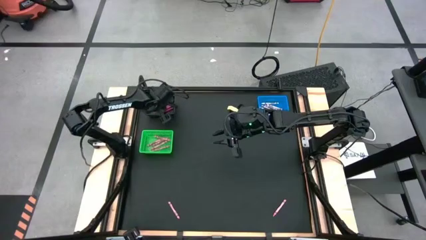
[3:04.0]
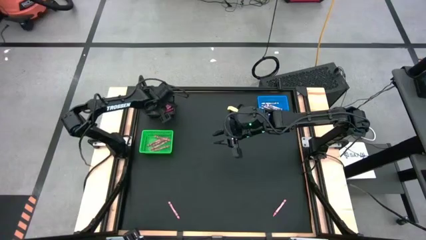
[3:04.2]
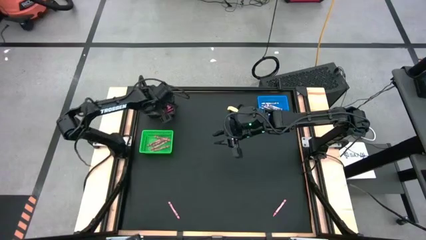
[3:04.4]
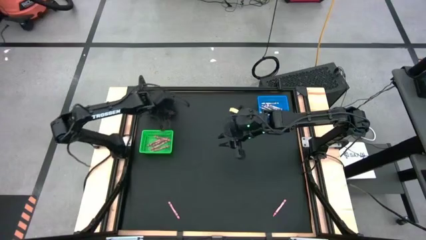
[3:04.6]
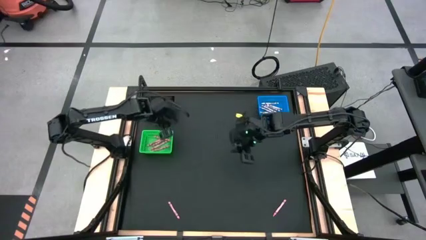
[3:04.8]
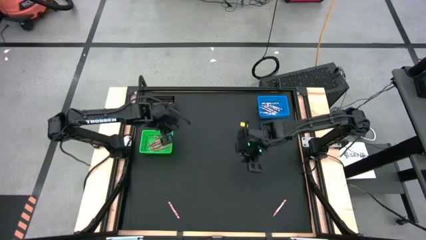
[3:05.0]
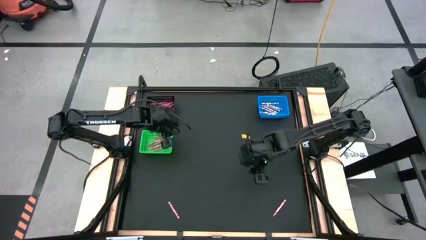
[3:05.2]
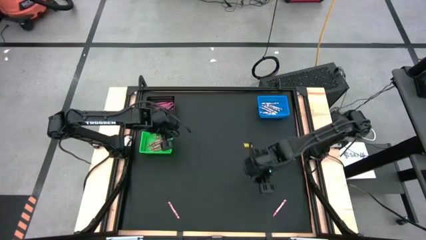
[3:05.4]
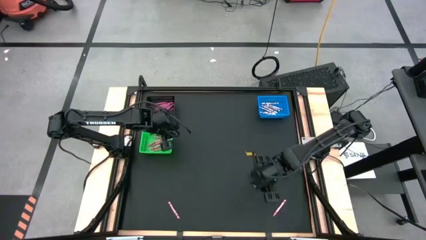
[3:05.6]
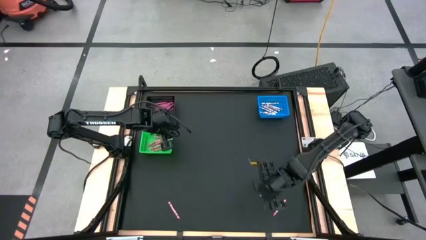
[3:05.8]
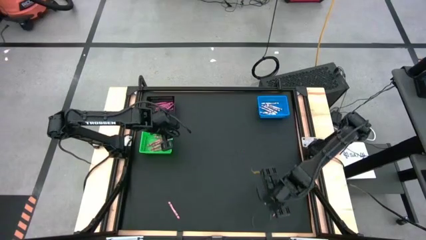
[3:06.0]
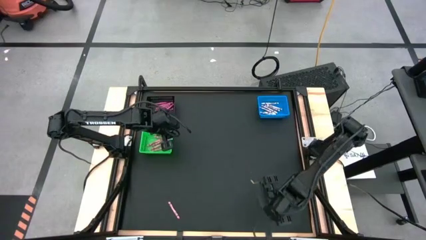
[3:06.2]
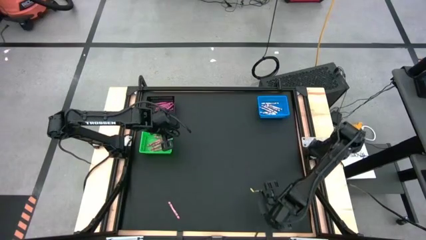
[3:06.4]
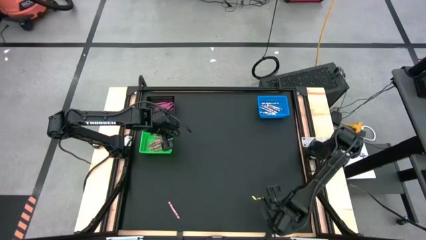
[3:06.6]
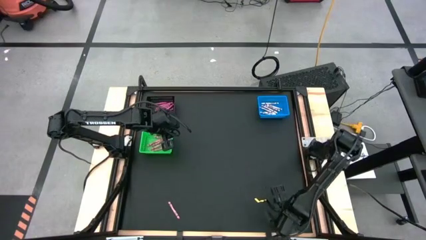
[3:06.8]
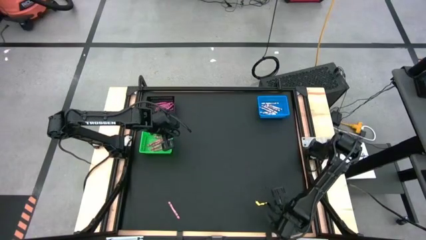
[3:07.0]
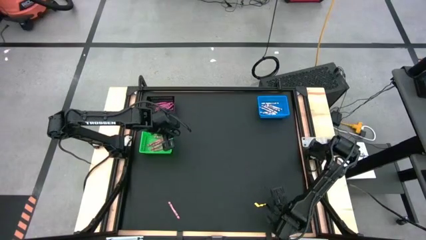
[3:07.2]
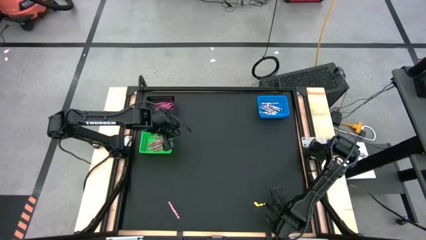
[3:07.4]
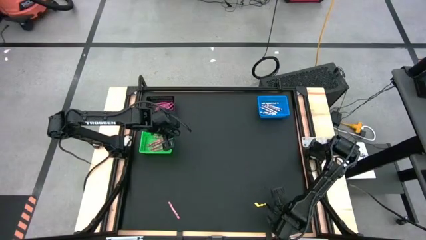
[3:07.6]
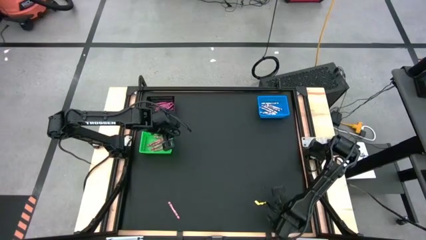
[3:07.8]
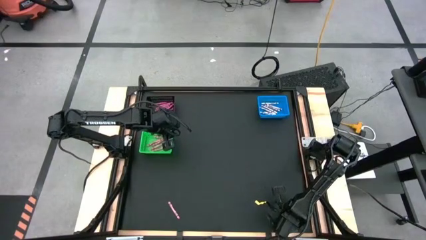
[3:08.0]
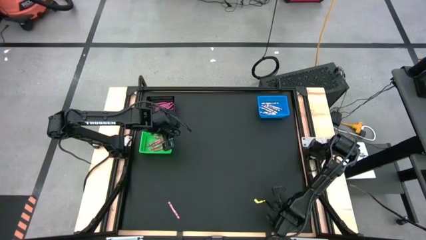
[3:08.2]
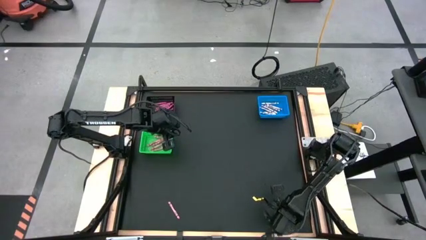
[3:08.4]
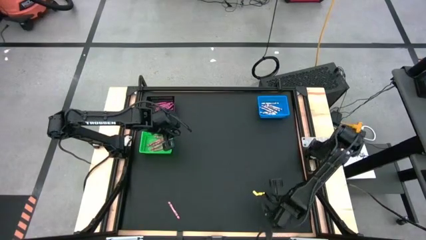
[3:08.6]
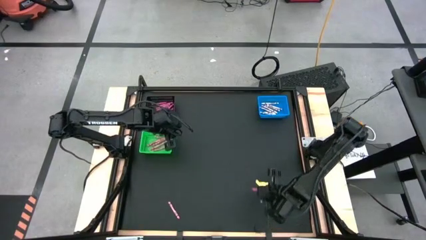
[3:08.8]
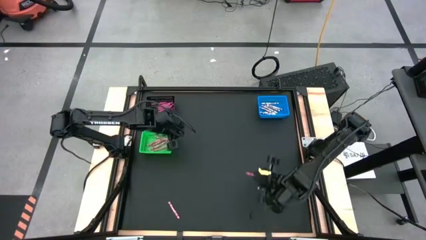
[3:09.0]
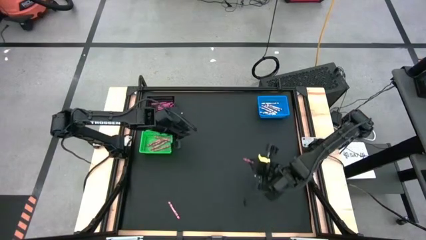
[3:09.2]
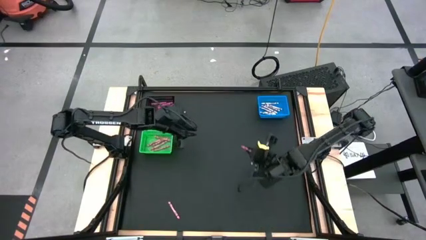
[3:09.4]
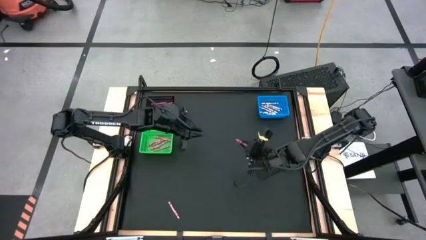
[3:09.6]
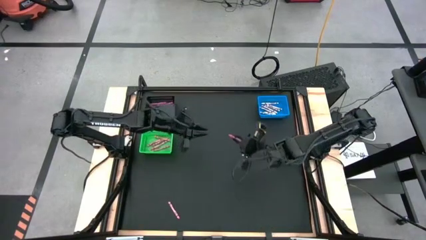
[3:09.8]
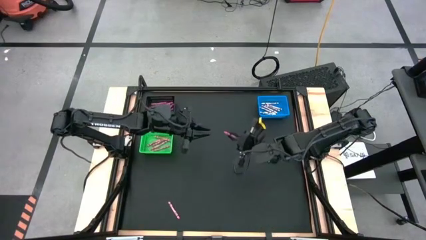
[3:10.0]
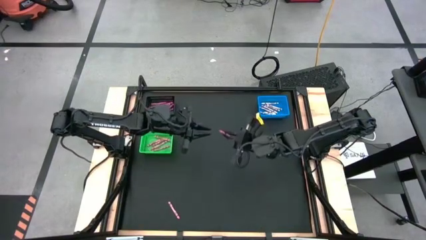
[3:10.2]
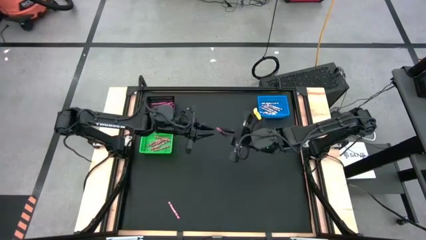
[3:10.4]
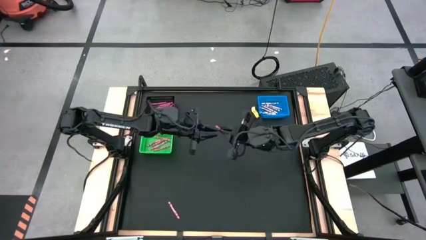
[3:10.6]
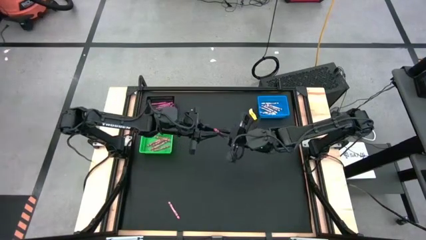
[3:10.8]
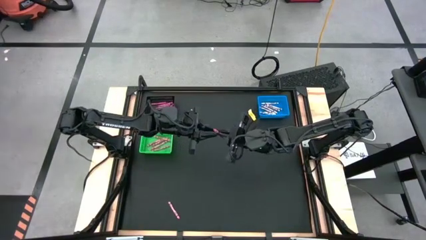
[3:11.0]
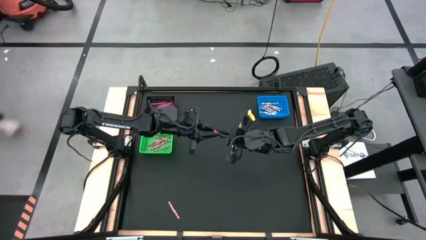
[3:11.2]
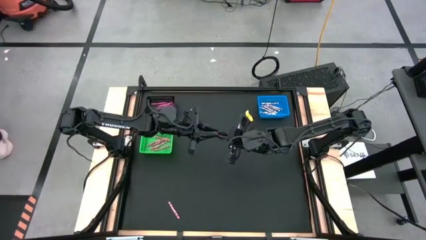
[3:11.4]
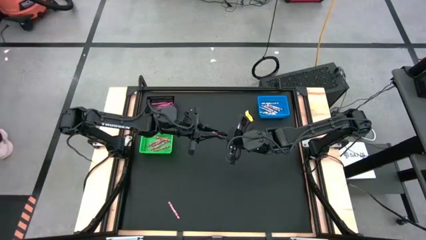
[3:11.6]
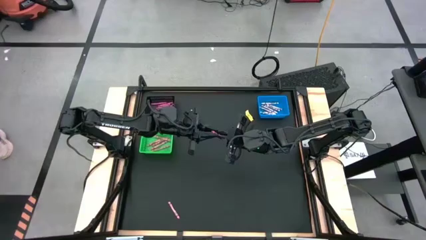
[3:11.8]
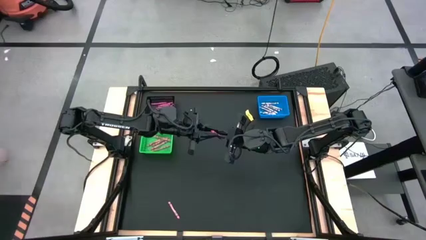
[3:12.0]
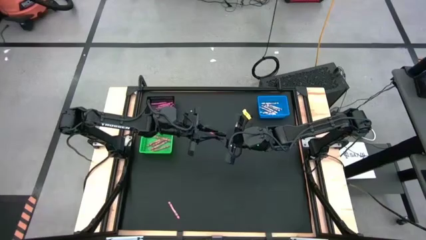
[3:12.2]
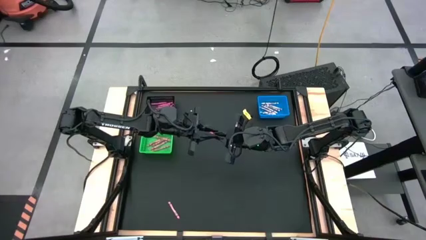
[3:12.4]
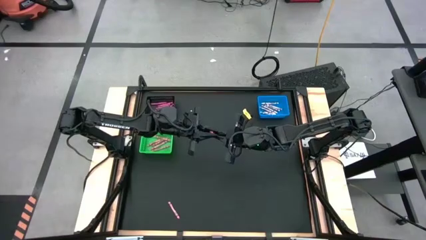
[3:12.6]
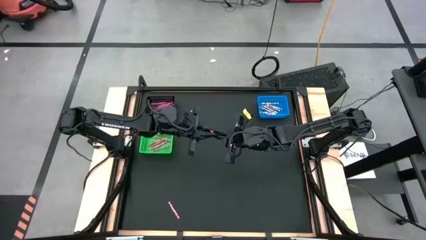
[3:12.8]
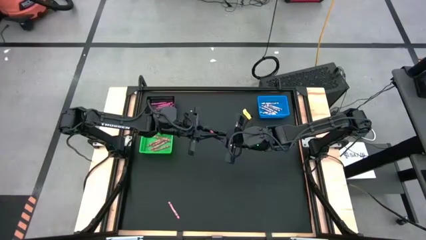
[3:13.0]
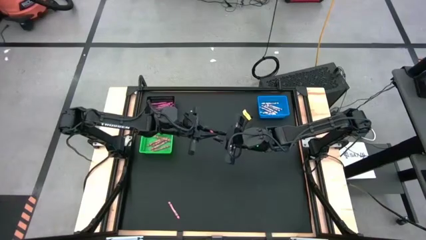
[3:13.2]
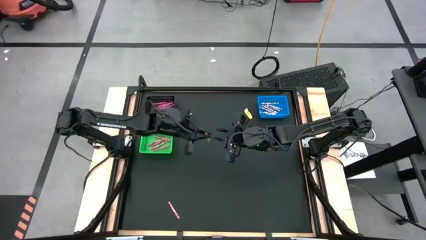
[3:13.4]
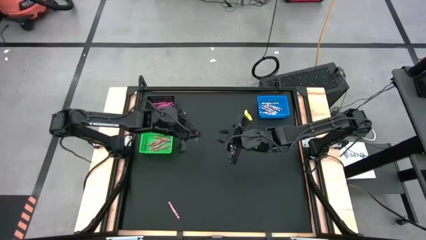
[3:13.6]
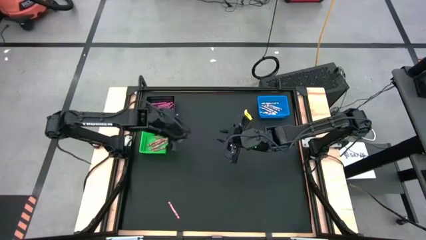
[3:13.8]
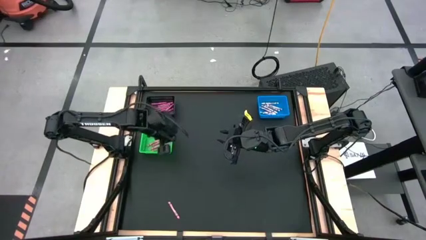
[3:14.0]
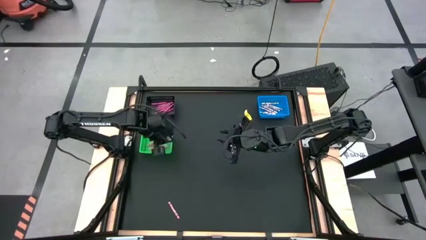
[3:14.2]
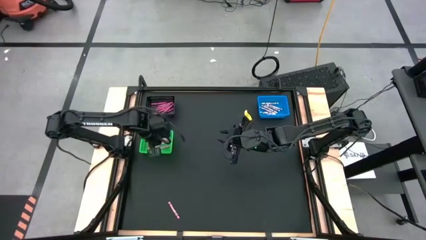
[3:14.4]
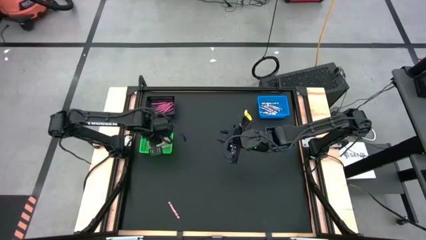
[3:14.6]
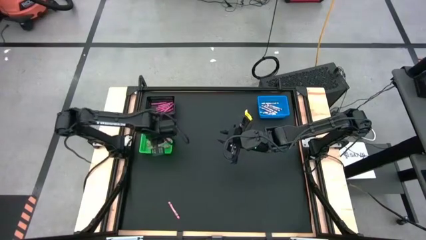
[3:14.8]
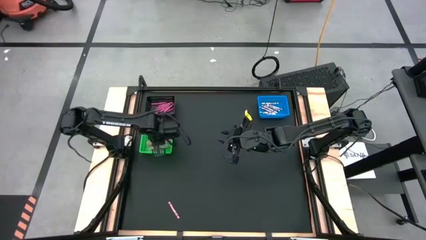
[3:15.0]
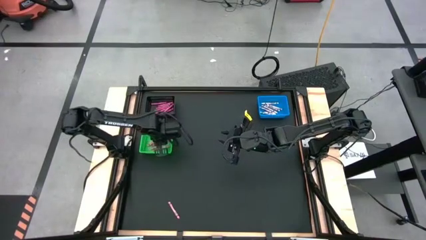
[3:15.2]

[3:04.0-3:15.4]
Task: Sort crayons
Put the pink crayon into the green bin

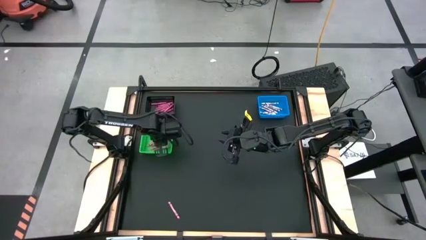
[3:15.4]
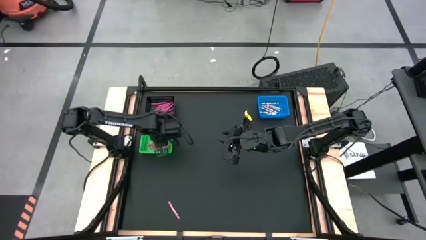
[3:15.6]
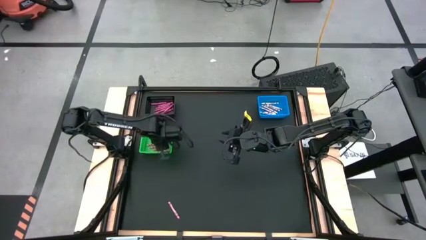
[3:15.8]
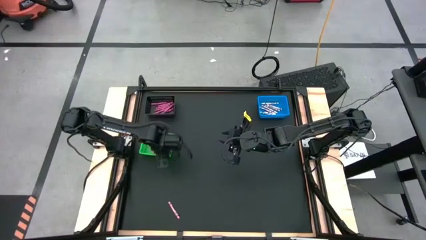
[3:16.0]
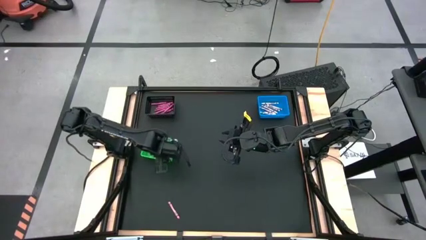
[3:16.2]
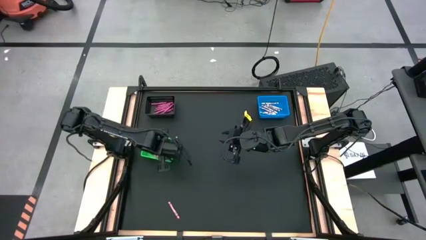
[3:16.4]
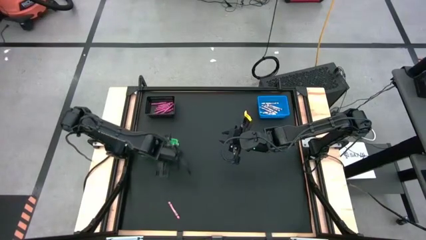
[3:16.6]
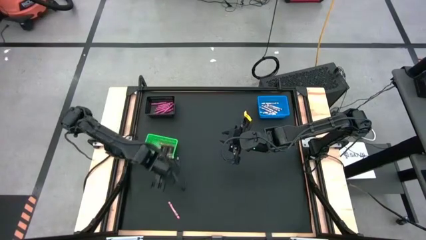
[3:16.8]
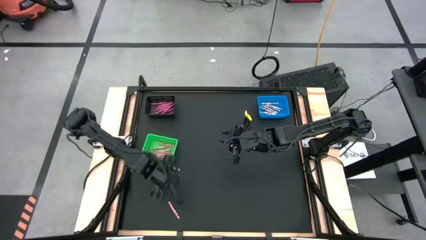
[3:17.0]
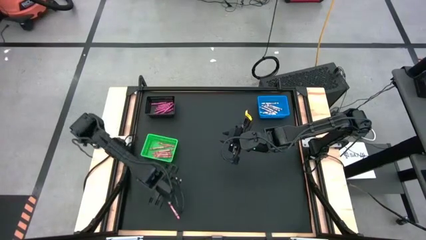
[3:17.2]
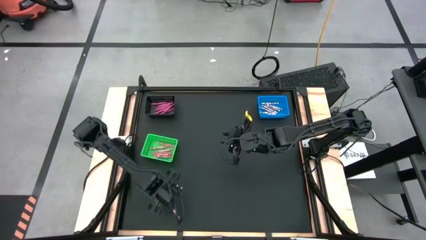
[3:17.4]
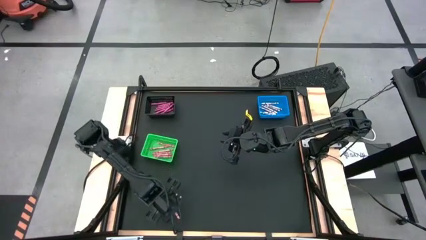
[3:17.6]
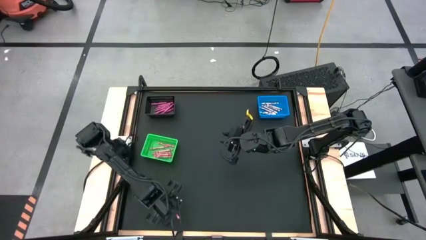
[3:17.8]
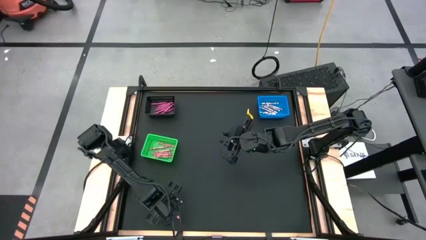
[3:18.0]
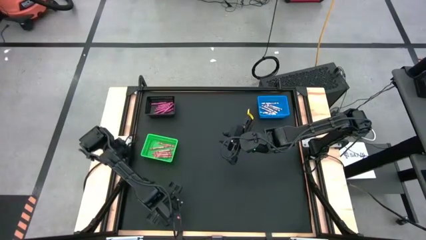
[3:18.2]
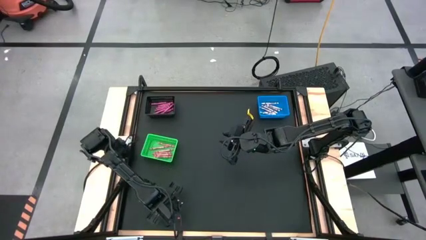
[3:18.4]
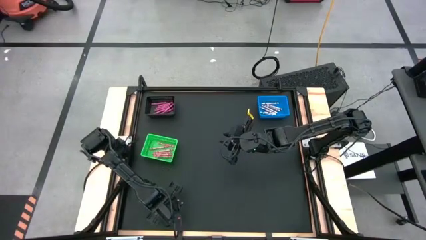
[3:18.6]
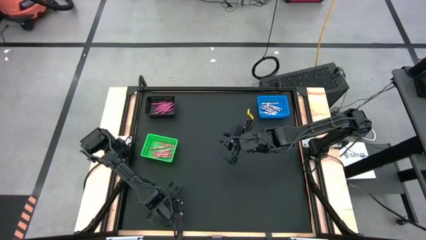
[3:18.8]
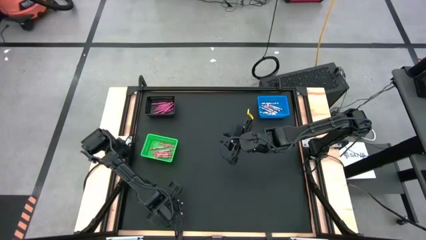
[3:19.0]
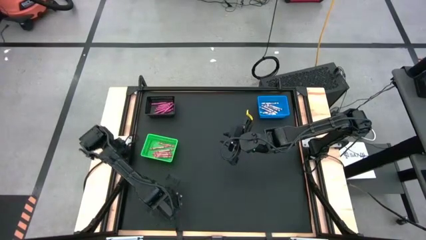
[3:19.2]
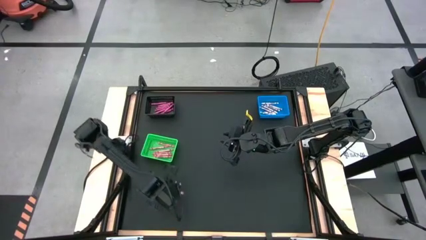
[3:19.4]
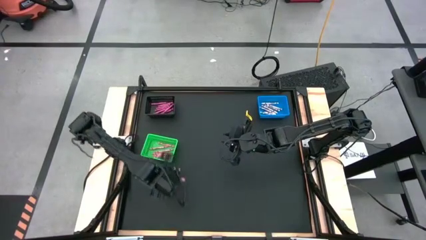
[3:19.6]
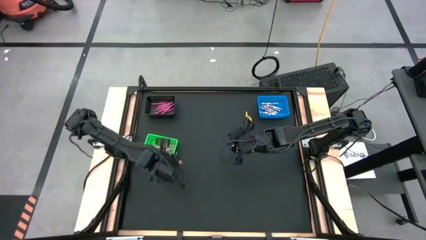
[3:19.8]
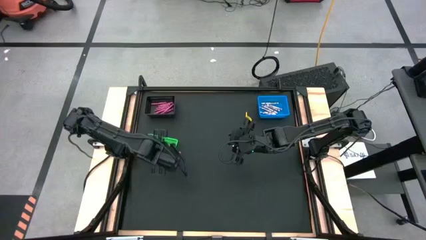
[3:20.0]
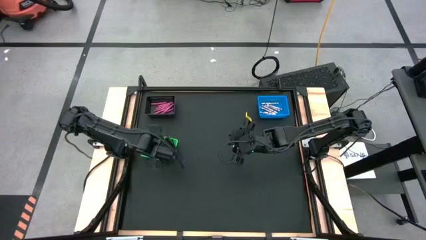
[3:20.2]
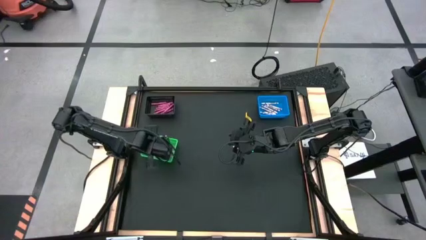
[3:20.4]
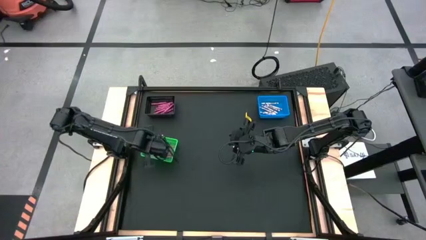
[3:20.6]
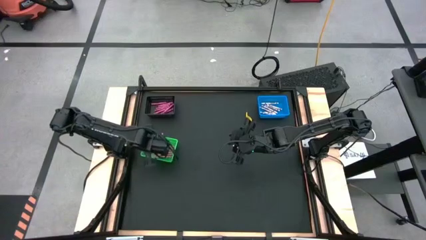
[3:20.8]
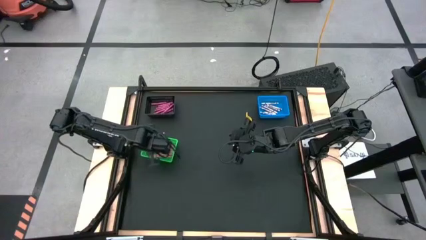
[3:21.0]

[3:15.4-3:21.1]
Put the pink crayon into the green bin
